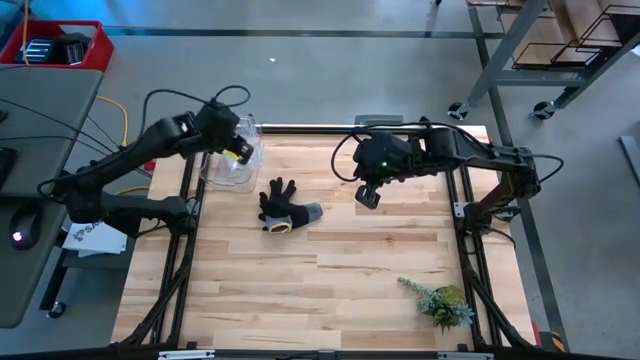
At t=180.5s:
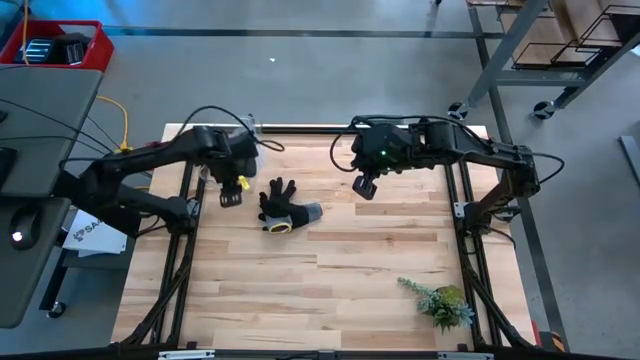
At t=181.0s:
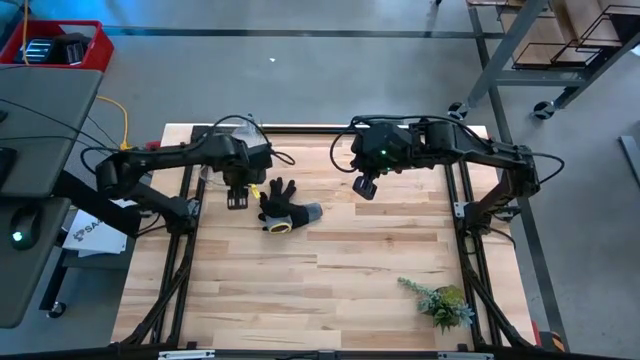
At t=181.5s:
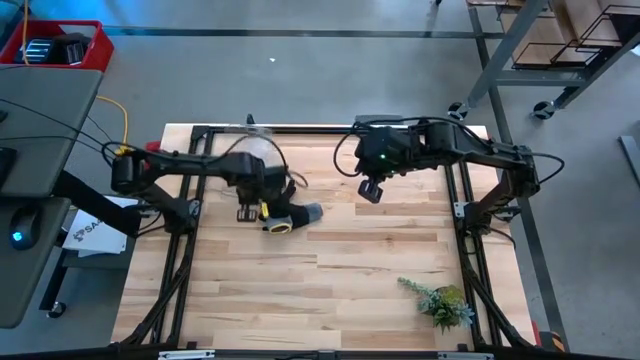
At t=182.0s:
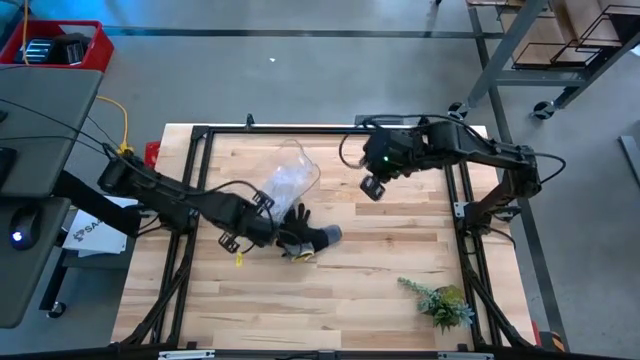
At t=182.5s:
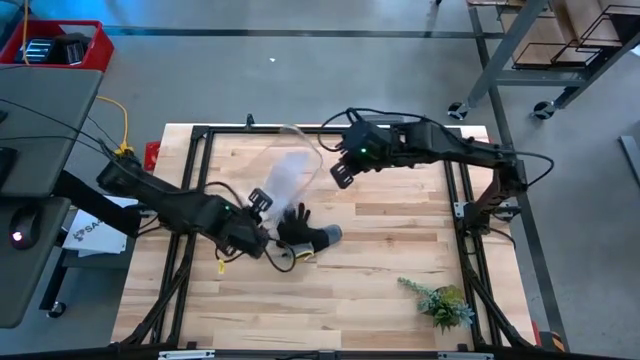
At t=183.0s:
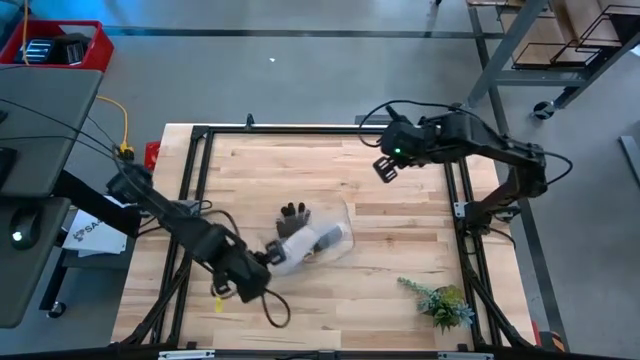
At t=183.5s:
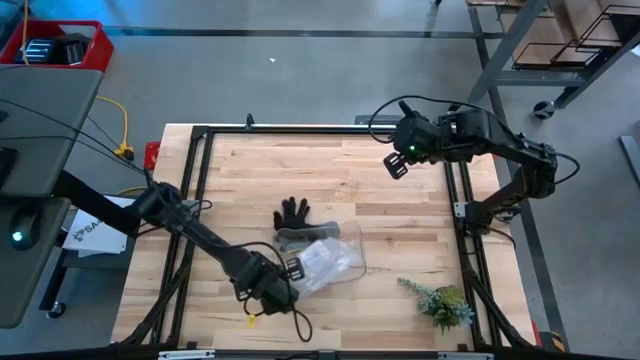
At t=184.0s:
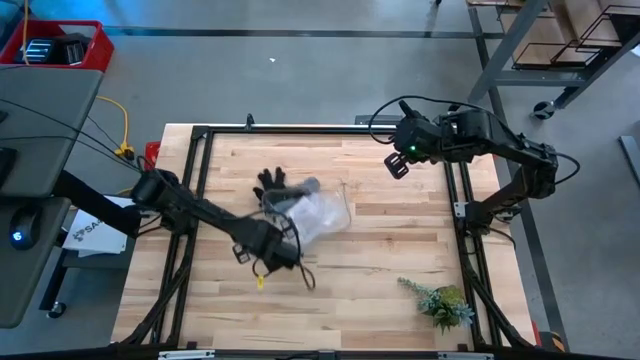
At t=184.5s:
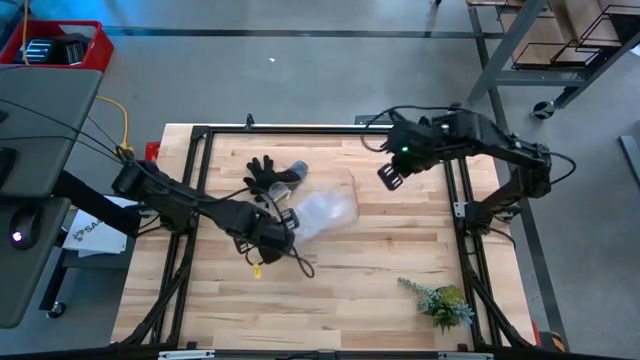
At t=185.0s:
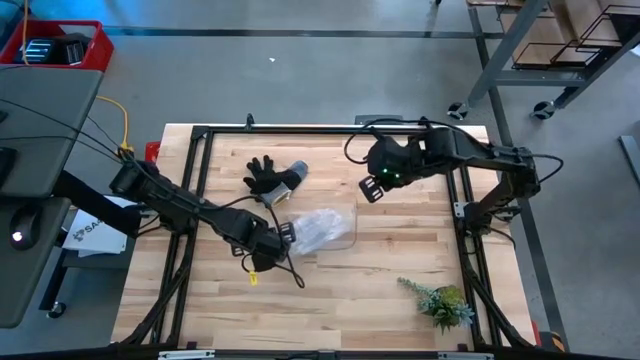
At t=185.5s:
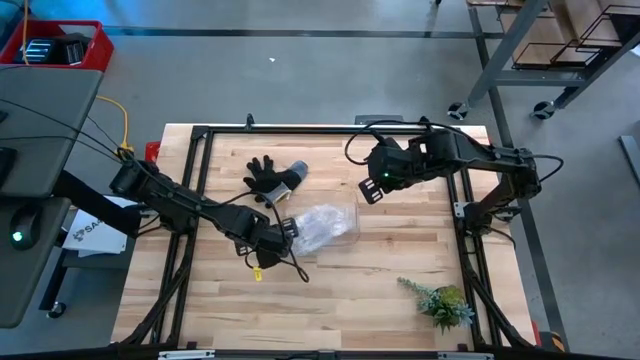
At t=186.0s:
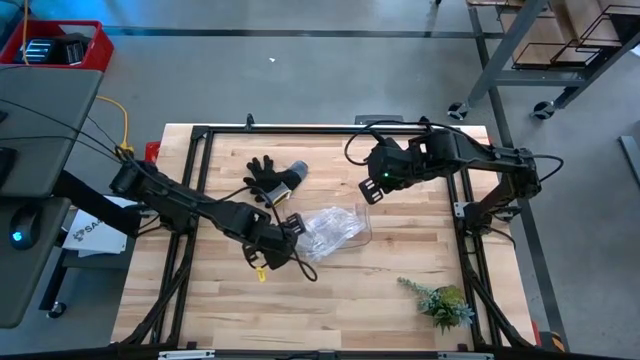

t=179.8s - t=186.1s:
Task: Roll bandage
Move the transparent bin to the center of the table

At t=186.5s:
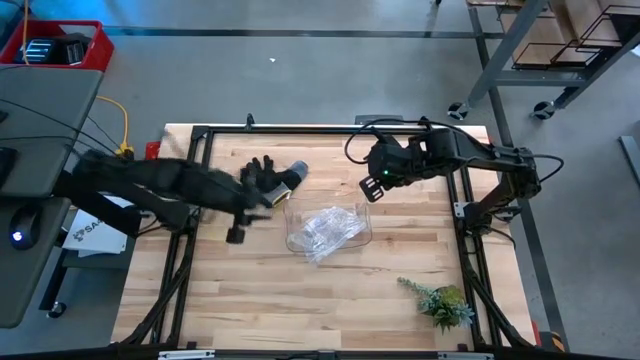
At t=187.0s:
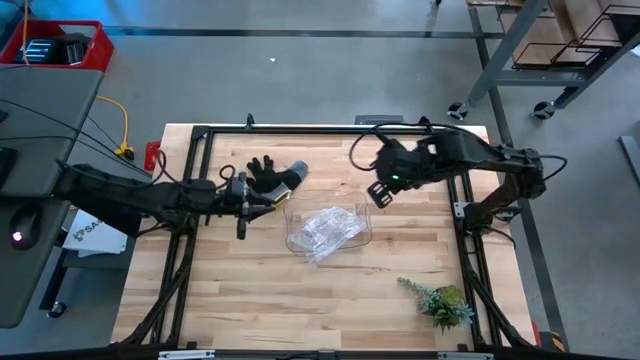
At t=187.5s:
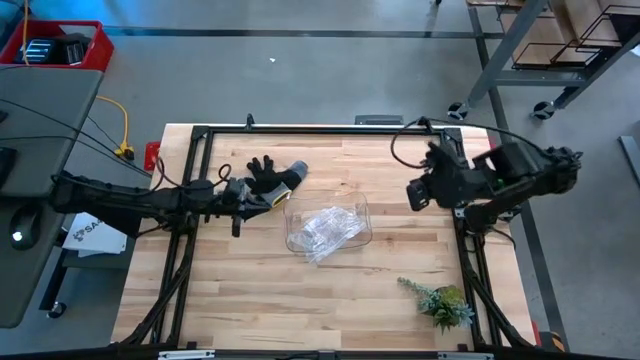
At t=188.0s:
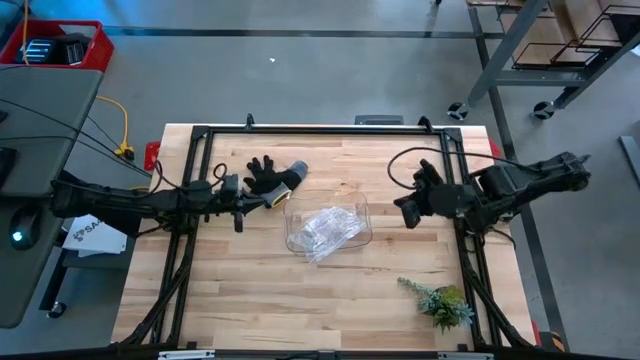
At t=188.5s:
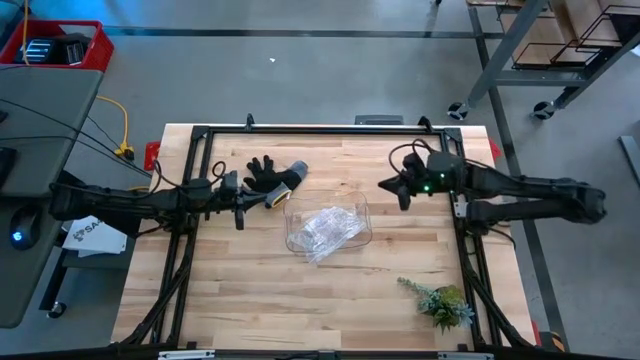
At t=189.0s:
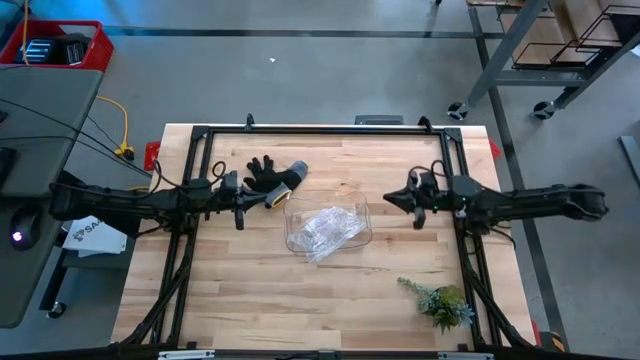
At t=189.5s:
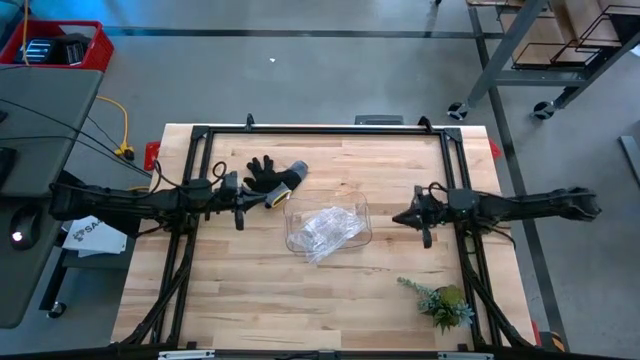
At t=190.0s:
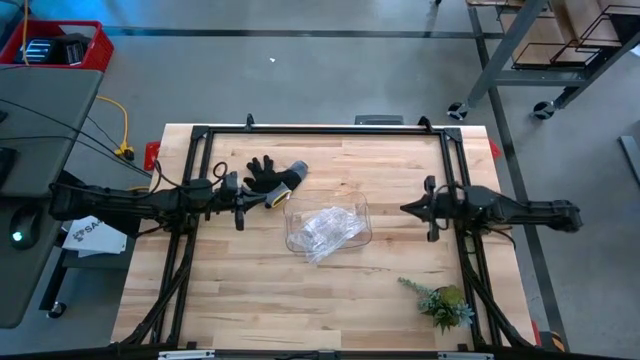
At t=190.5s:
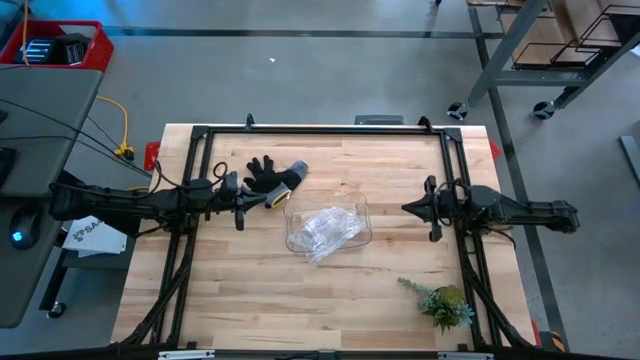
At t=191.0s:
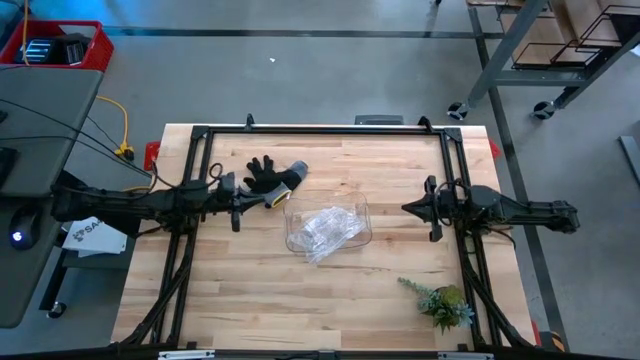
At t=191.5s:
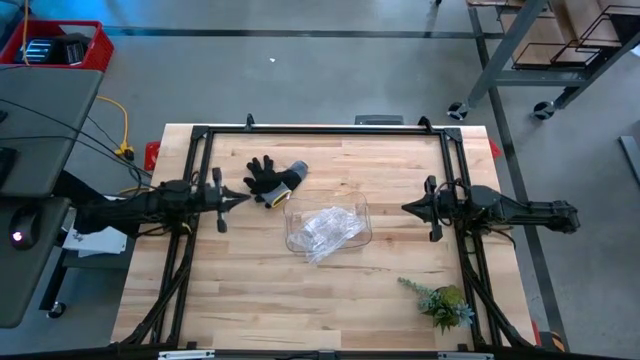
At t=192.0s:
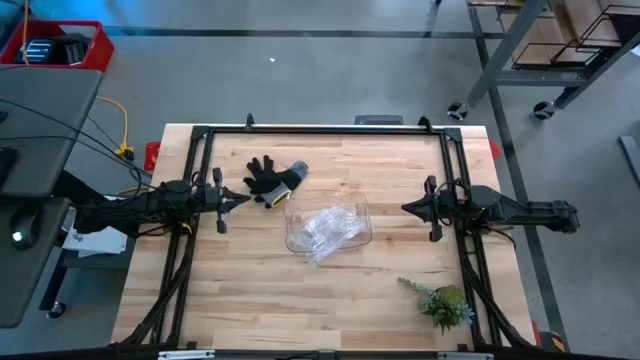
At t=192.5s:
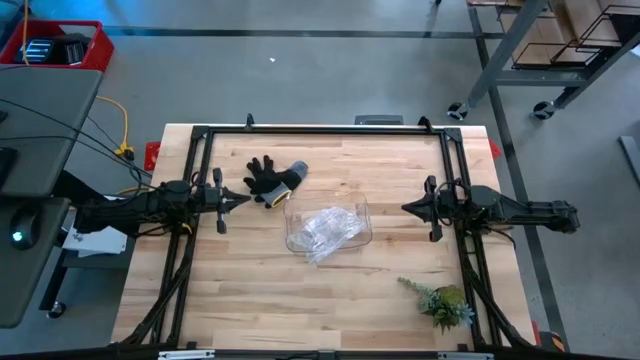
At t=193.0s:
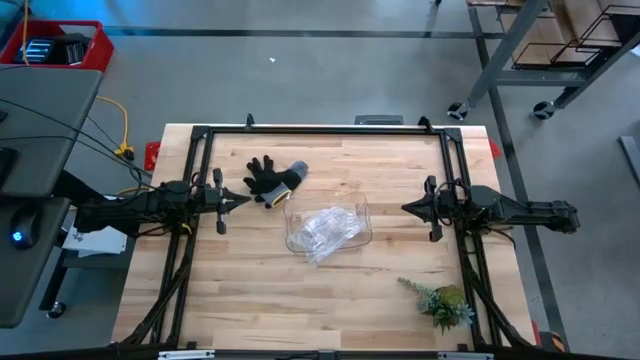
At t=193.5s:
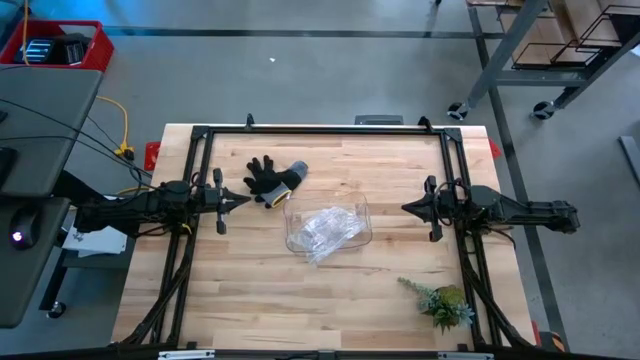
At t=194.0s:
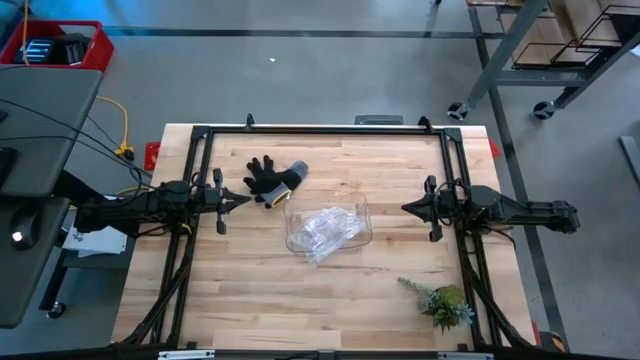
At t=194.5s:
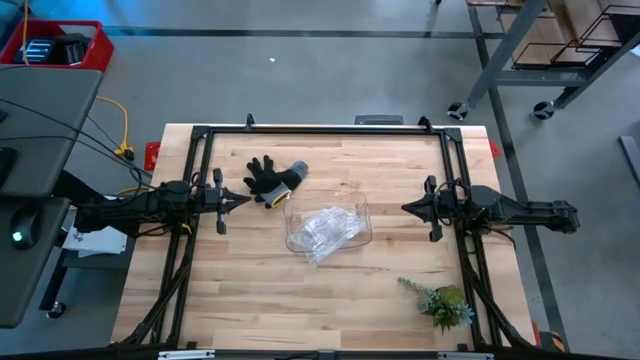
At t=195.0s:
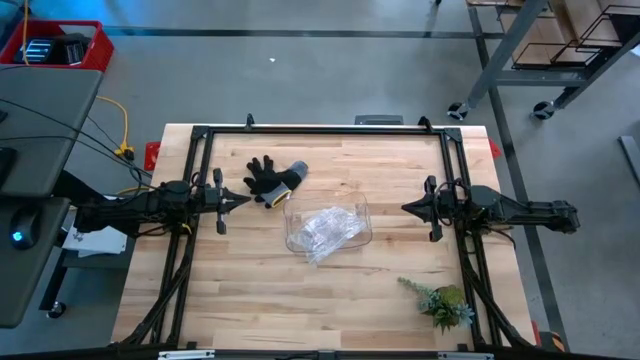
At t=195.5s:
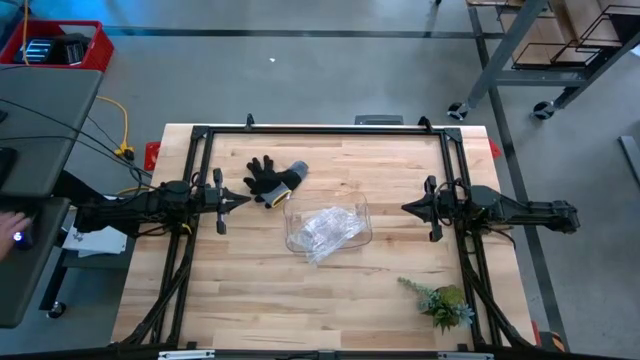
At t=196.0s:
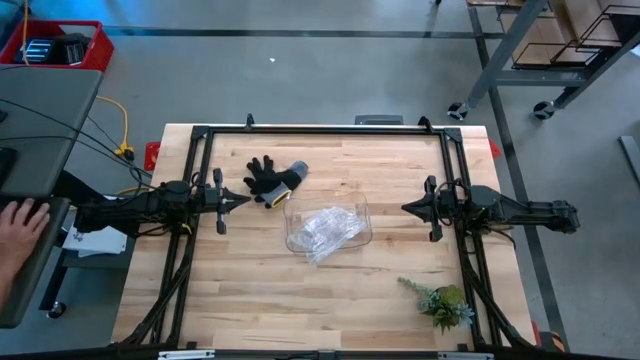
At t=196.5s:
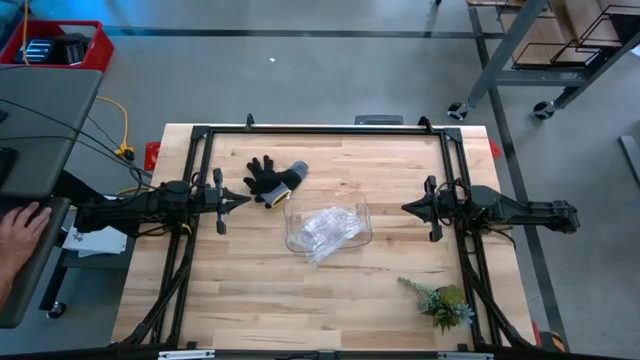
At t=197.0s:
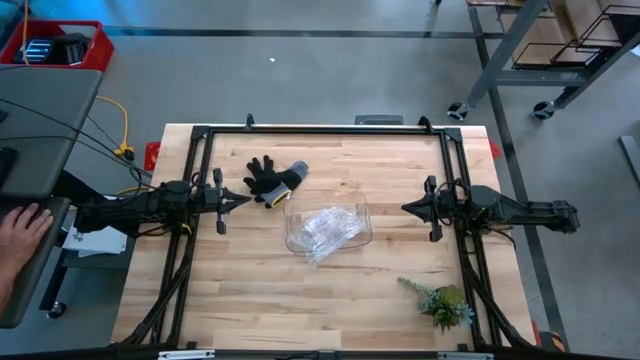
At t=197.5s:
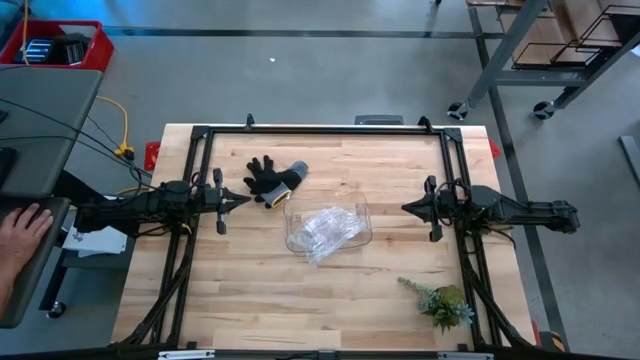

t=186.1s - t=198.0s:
Return to Home Position

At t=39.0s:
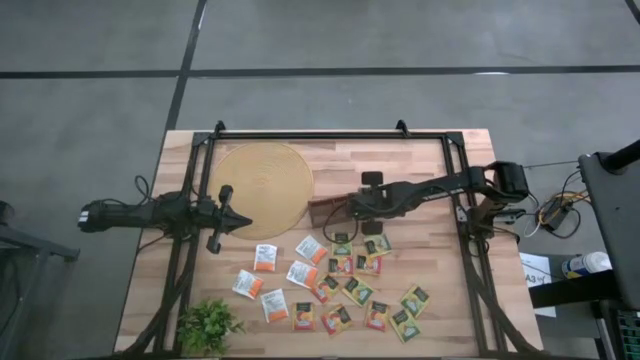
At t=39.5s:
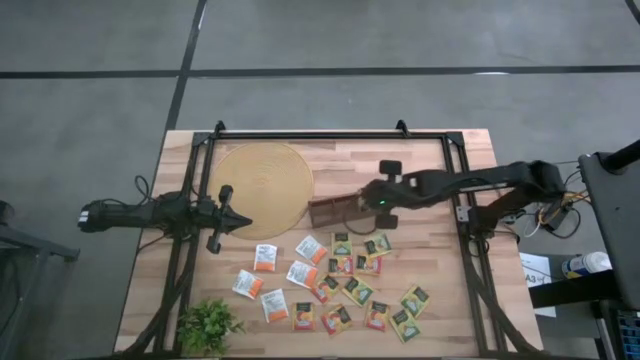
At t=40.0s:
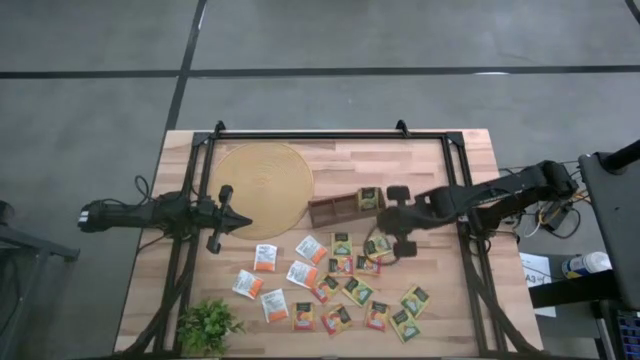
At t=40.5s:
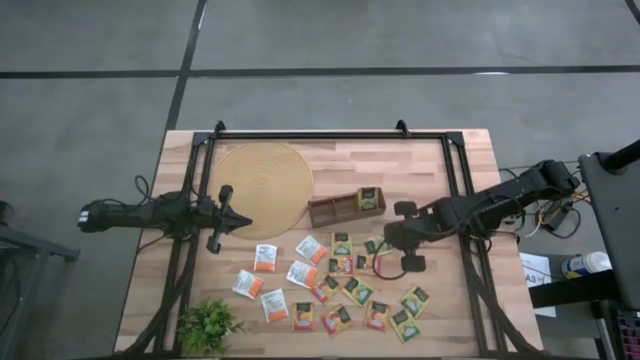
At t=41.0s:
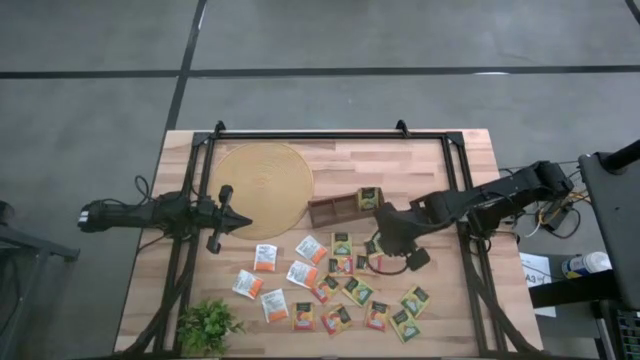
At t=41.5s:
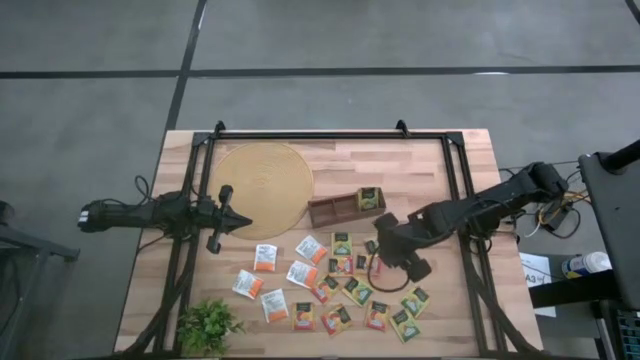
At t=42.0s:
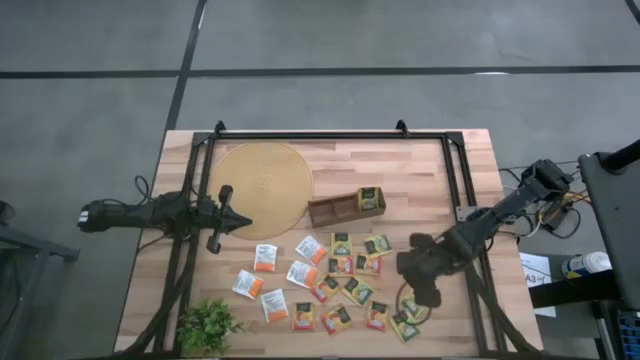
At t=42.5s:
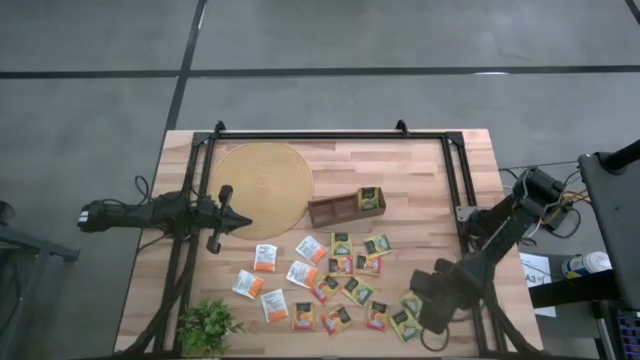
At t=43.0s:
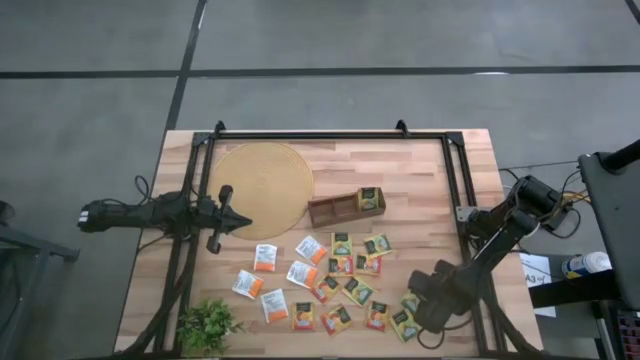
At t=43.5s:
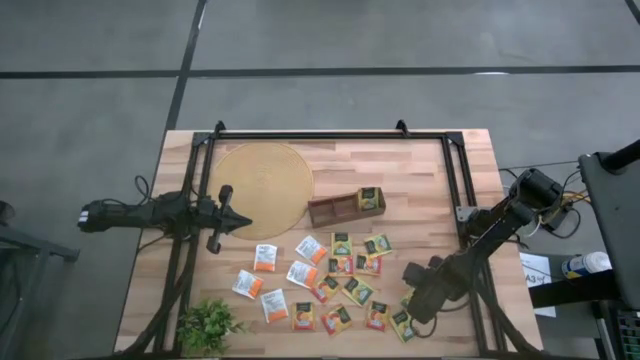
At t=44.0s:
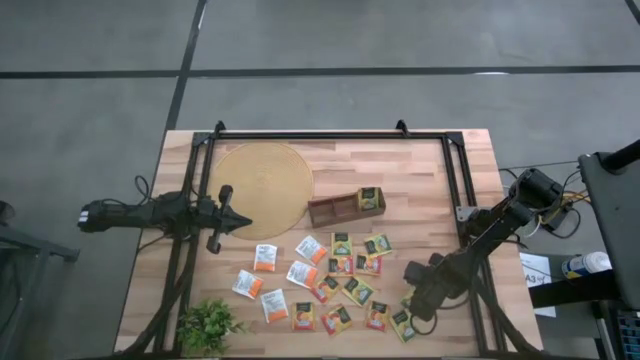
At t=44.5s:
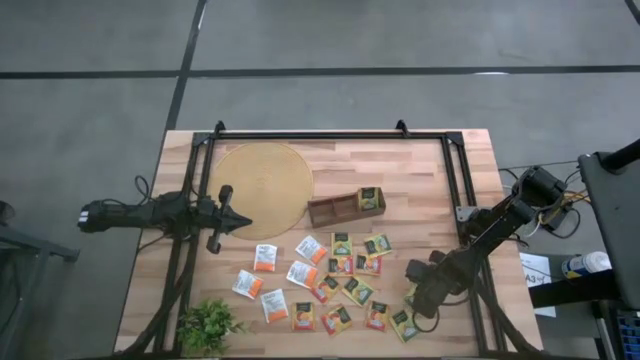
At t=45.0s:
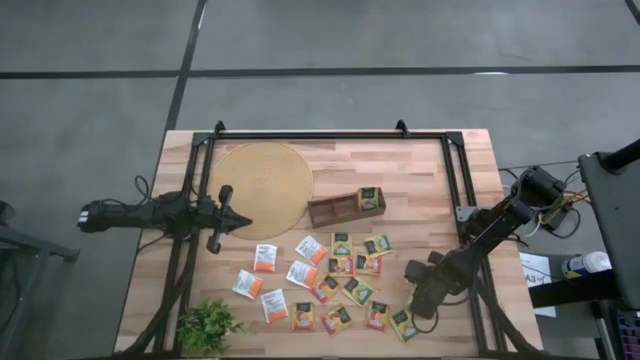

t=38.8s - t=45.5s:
Task: Pick & Place Tea
Put the yellow tea bag into the right section of the wooden organizer
